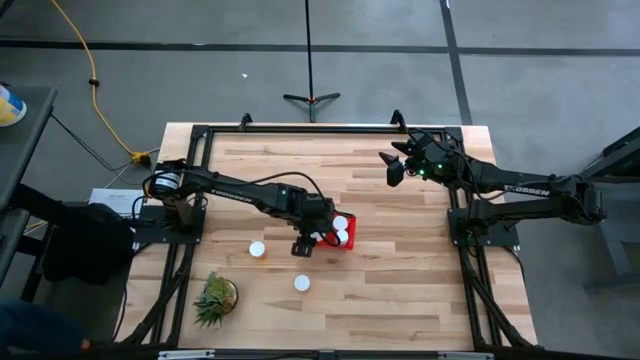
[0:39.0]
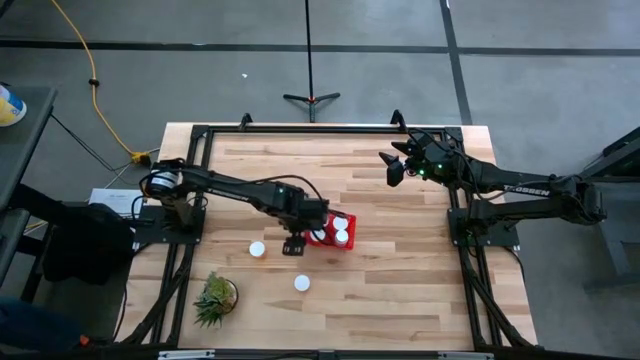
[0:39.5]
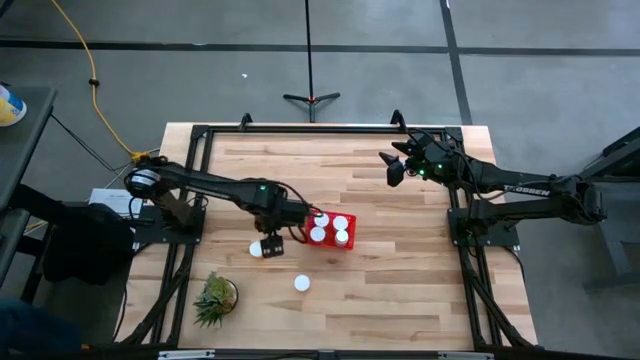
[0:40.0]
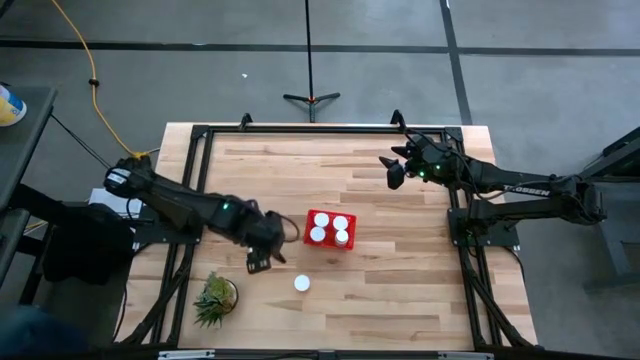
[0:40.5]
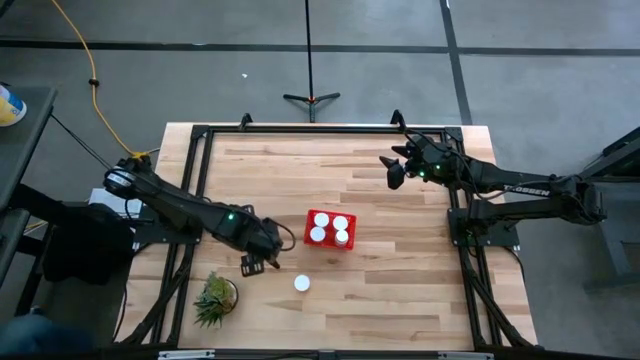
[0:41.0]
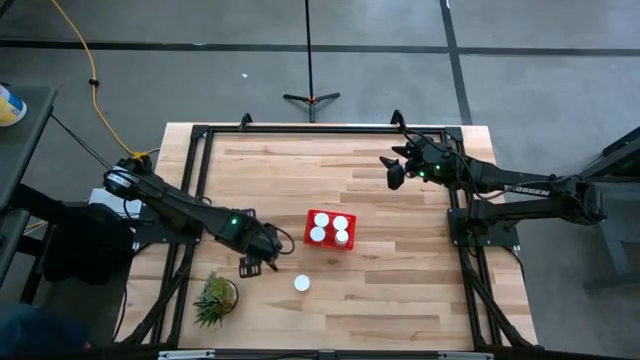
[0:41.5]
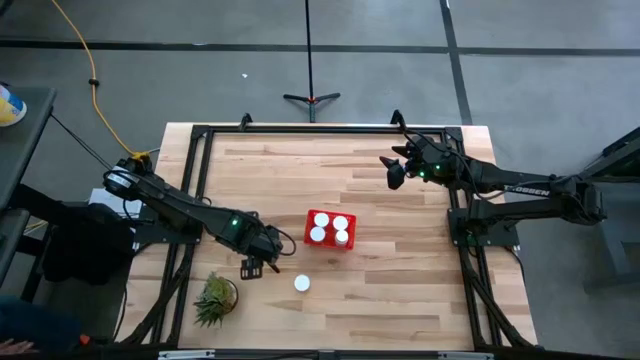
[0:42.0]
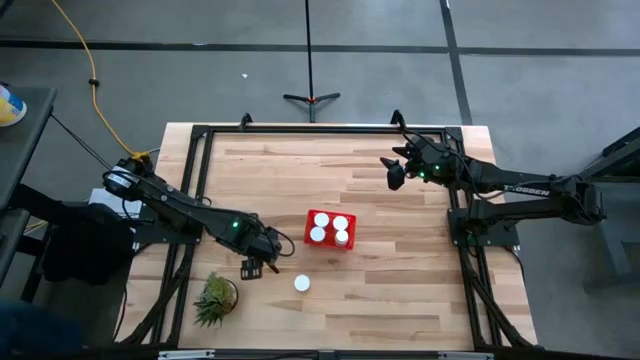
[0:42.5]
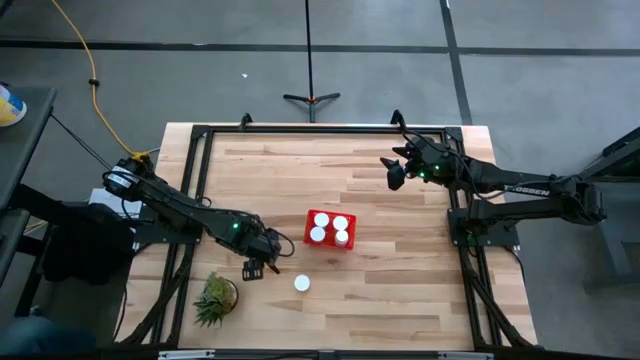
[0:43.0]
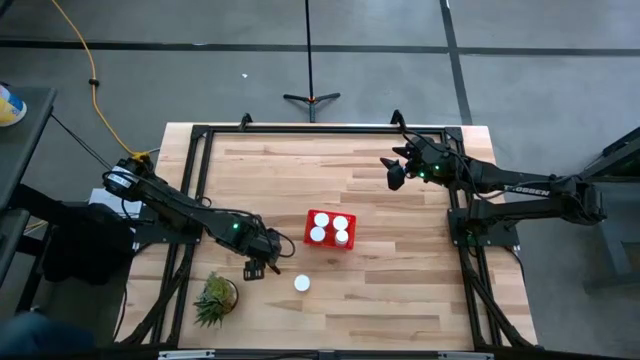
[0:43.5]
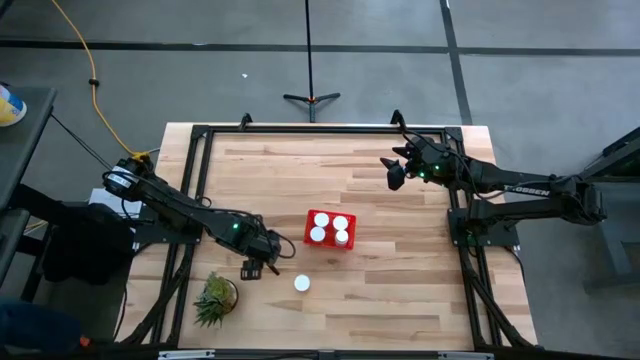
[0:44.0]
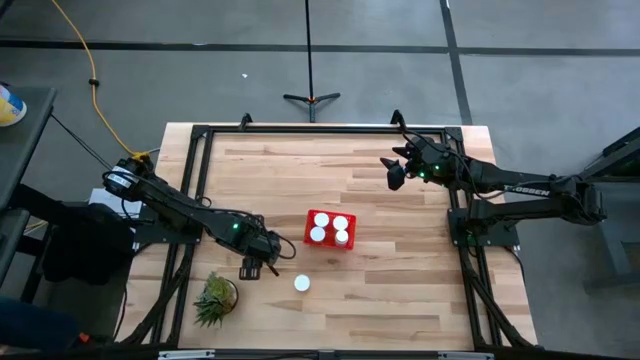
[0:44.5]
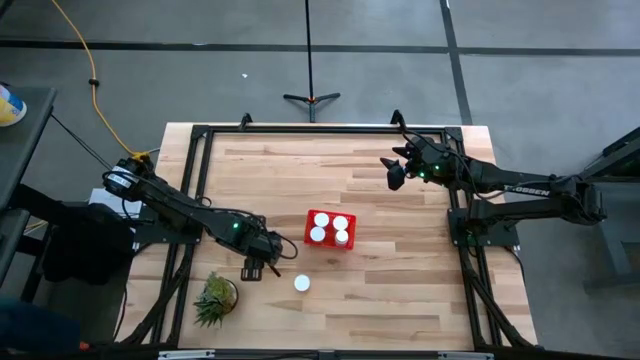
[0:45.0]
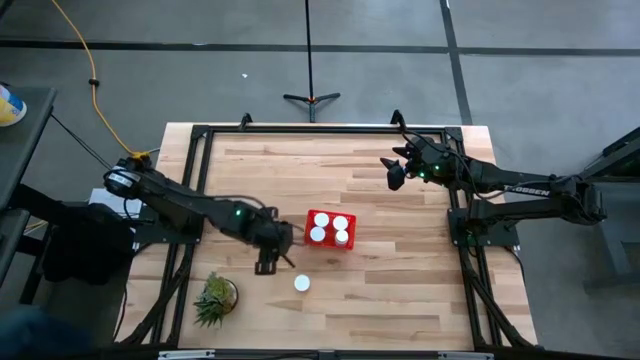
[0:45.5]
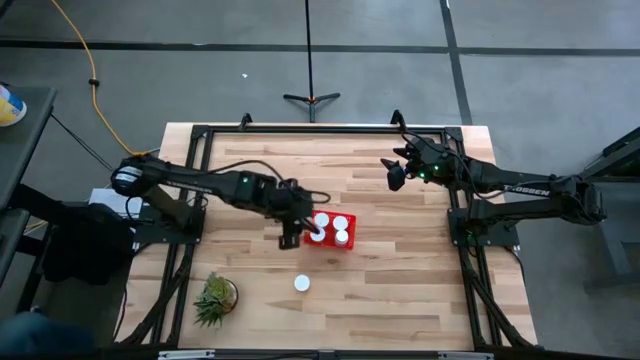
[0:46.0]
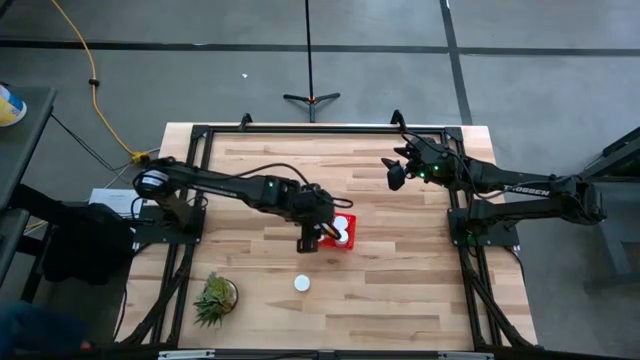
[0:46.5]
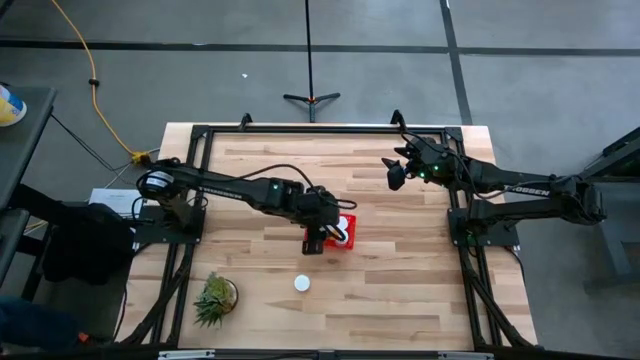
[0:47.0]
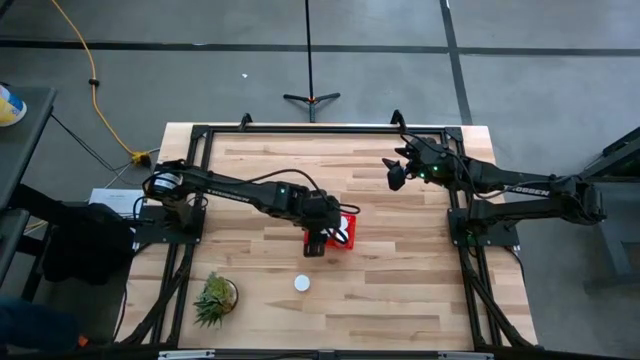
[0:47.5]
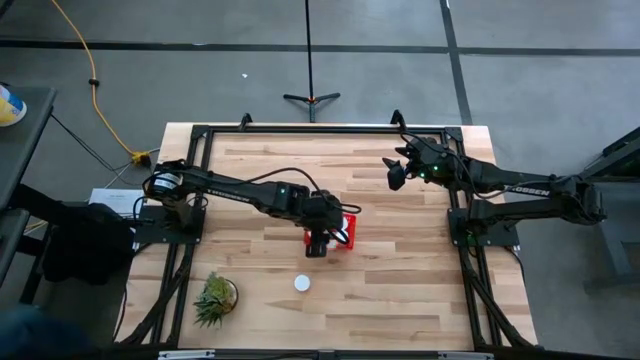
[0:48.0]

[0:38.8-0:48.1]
Task: Pick and place pill bottles into a basket
Put the top orange pill bottle into the red bin

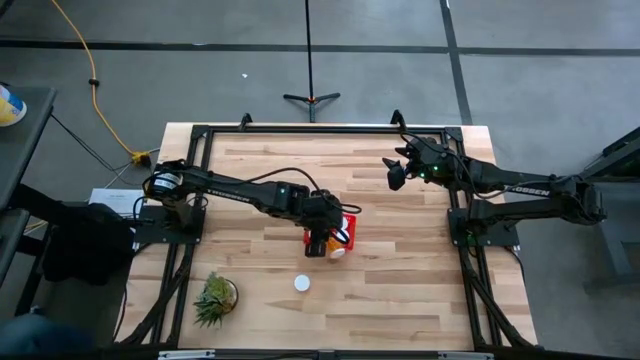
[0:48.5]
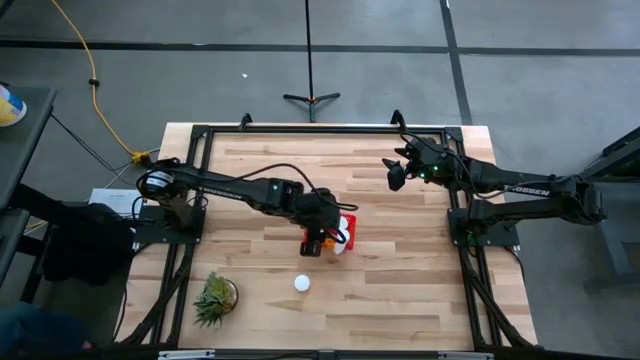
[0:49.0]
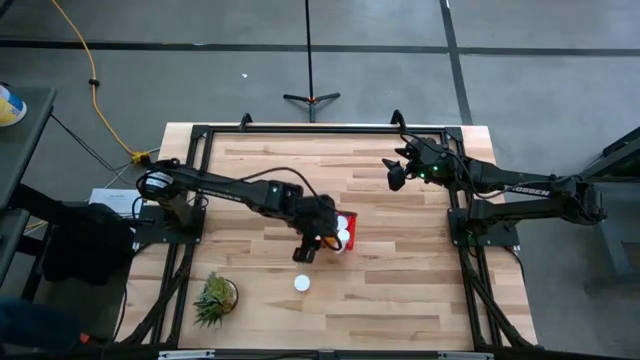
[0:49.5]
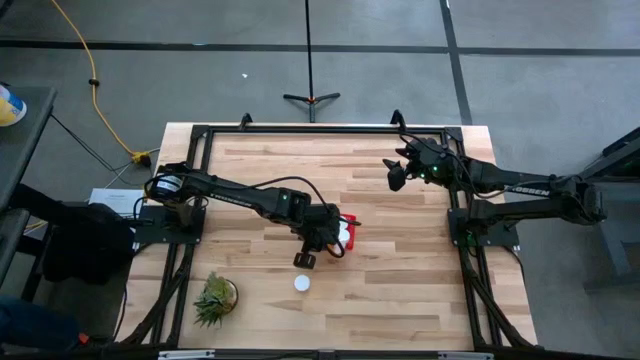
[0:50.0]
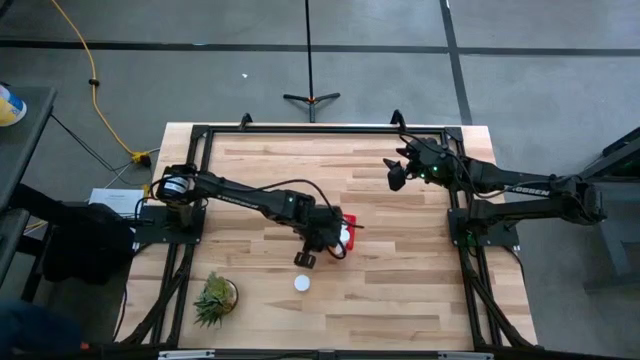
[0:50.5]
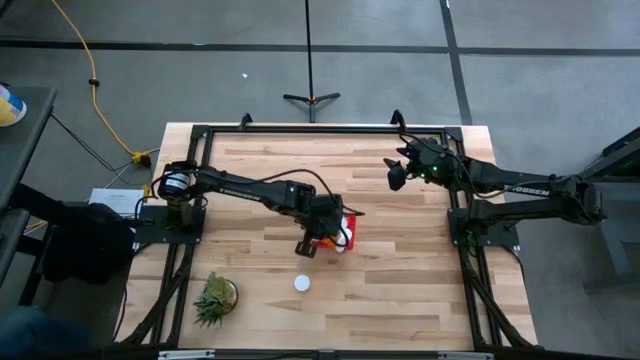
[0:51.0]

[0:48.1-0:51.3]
Put the top orange pill bottle into the red bin

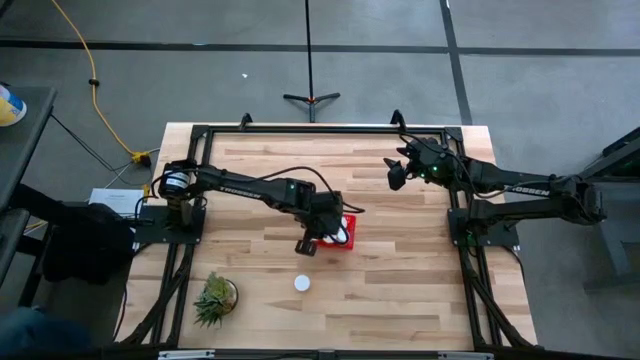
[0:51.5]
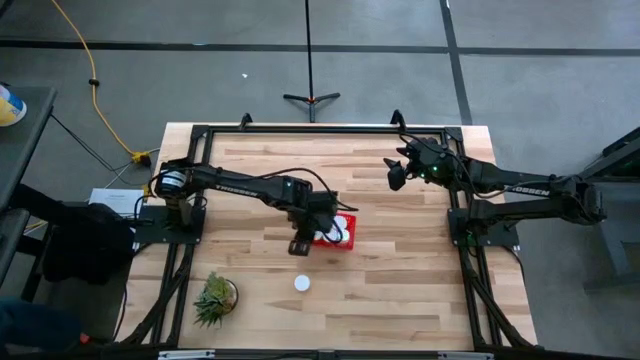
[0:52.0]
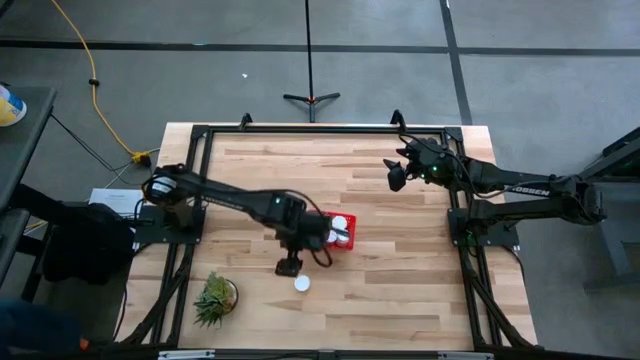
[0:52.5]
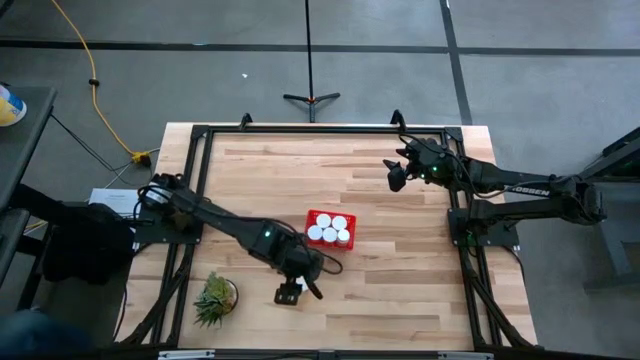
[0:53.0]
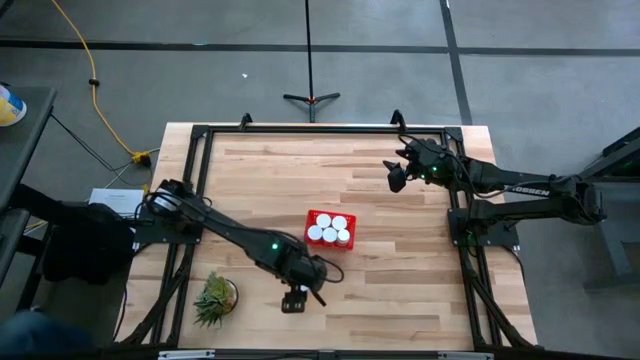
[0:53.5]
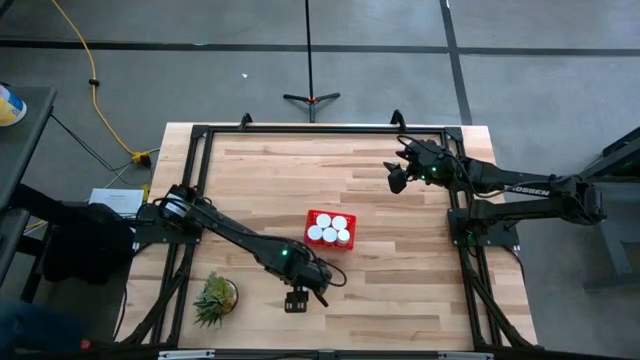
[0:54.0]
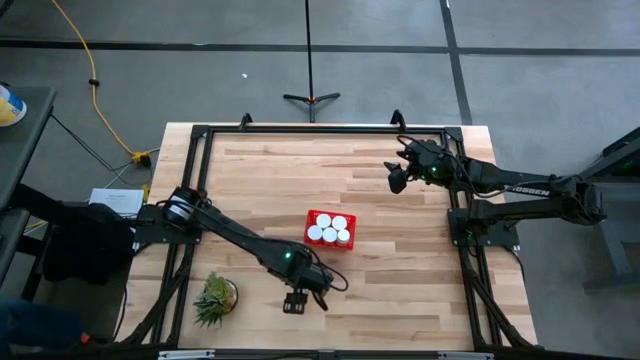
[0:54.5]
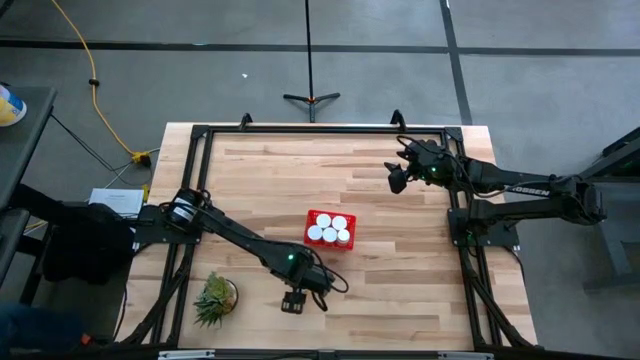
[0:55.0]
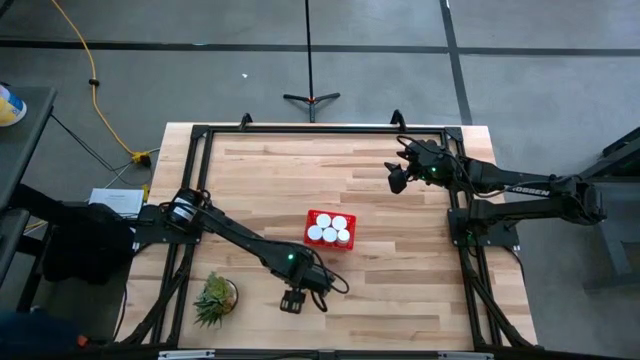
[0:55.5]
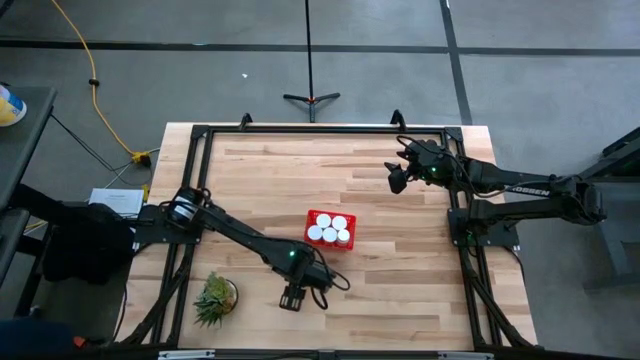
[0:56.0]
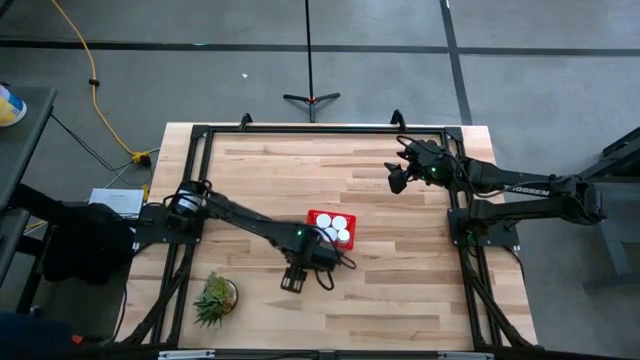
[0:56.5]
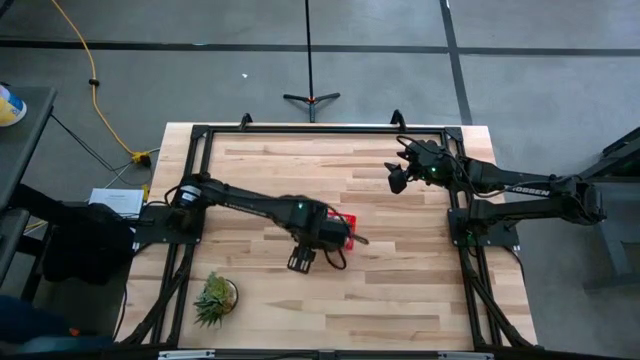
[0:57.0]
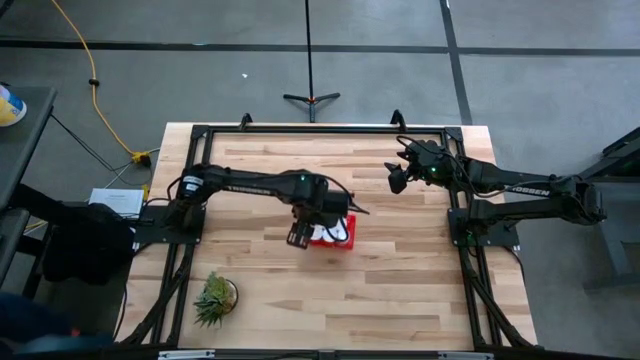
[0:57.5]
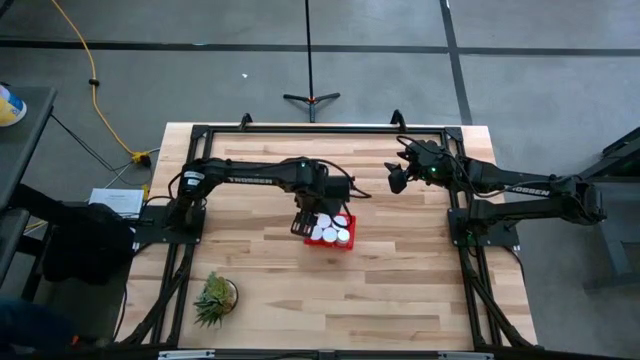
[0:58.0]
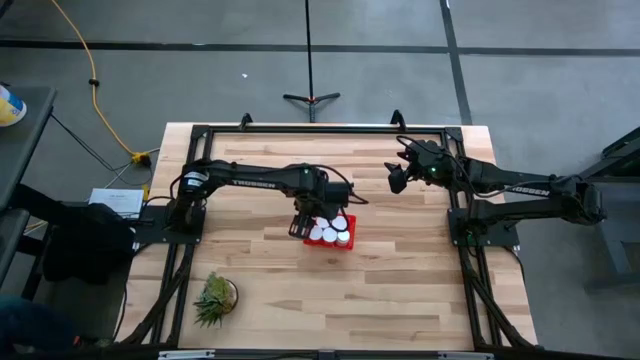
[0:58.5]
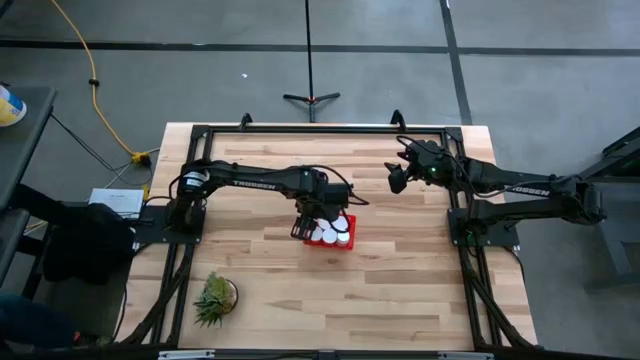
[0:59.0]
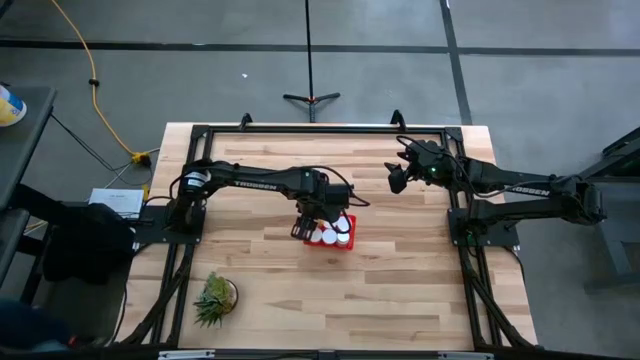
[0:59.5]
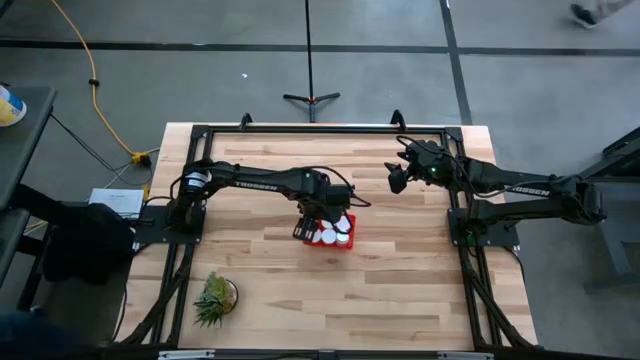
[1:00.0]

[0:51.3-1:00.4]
Put the orange pill bottle into the red bin
